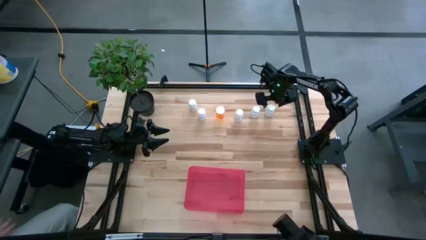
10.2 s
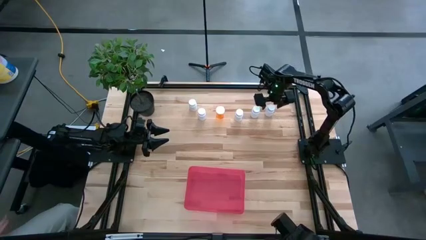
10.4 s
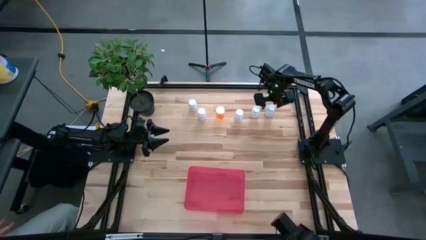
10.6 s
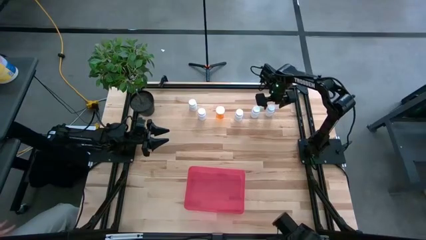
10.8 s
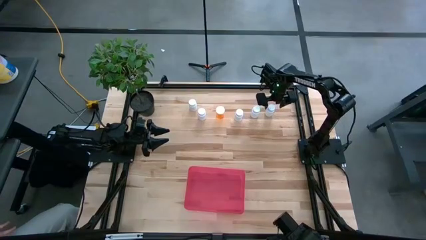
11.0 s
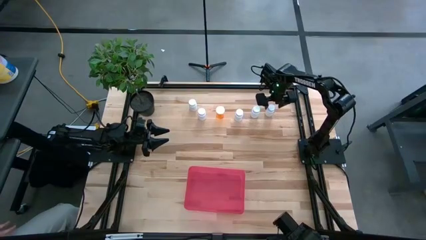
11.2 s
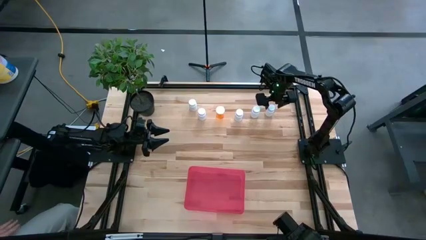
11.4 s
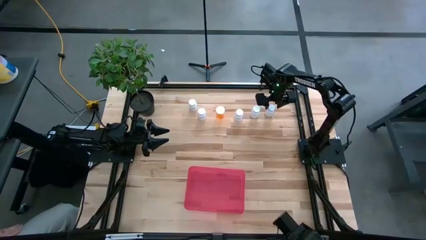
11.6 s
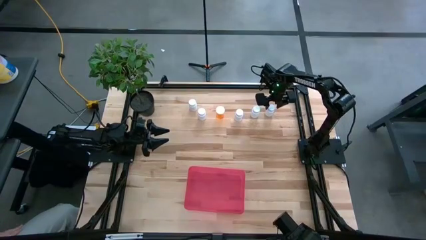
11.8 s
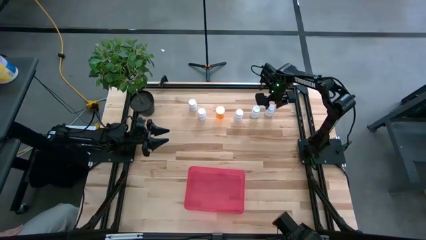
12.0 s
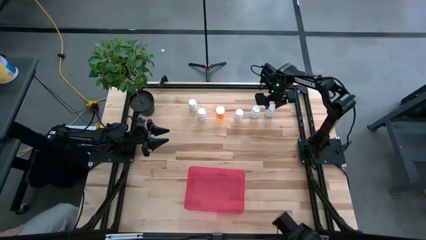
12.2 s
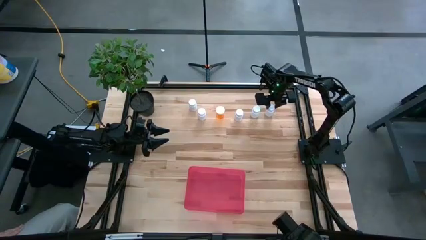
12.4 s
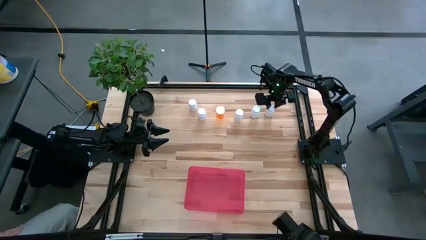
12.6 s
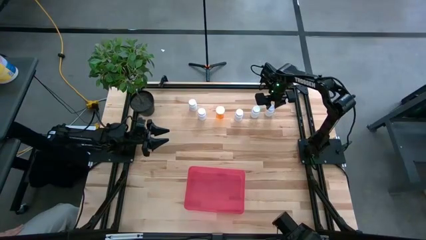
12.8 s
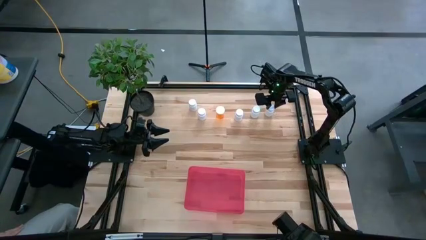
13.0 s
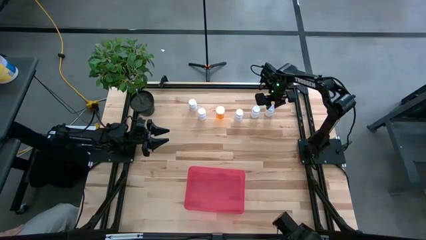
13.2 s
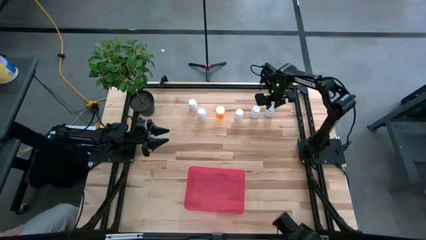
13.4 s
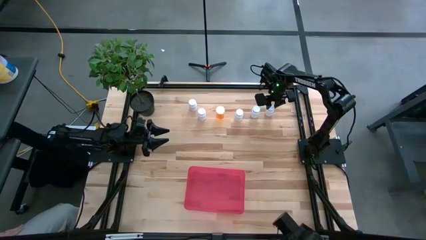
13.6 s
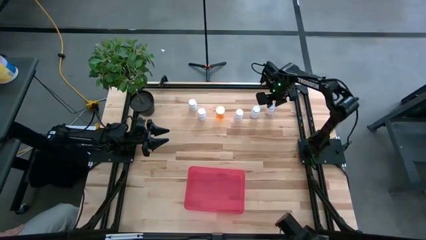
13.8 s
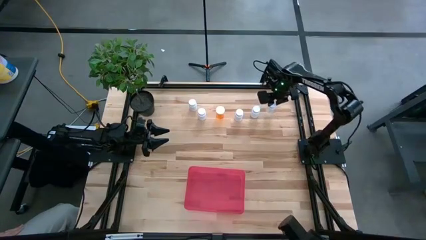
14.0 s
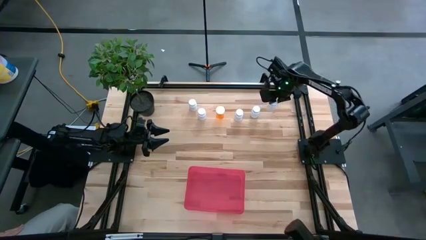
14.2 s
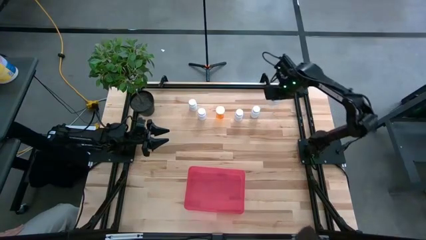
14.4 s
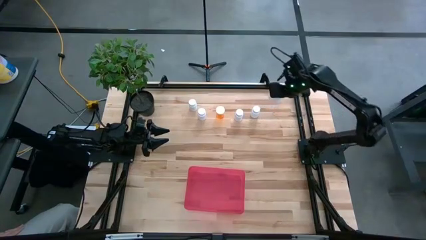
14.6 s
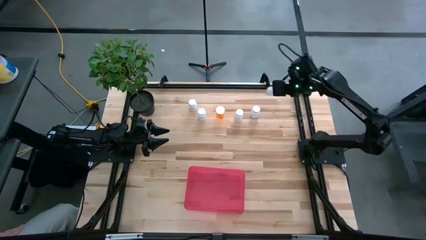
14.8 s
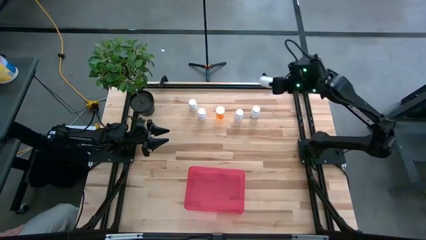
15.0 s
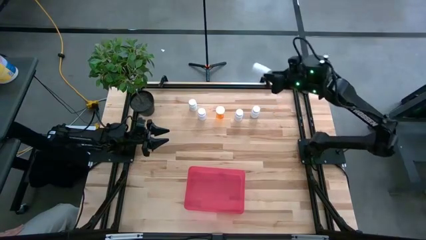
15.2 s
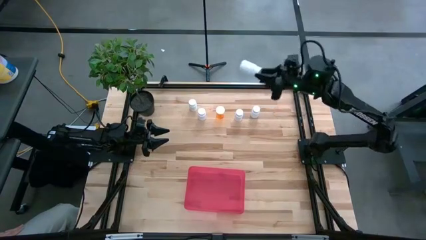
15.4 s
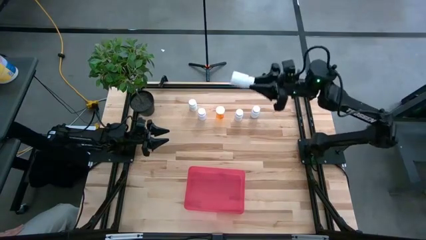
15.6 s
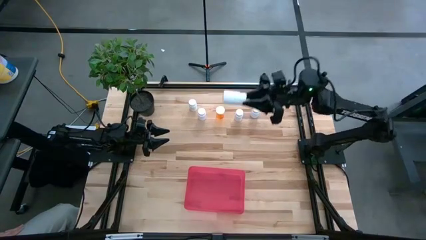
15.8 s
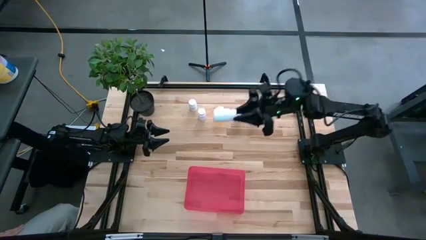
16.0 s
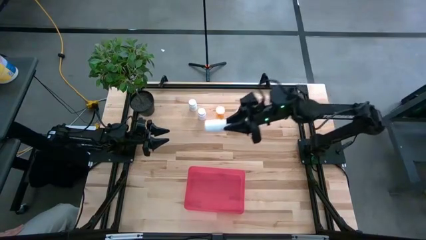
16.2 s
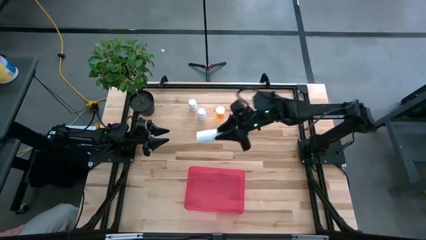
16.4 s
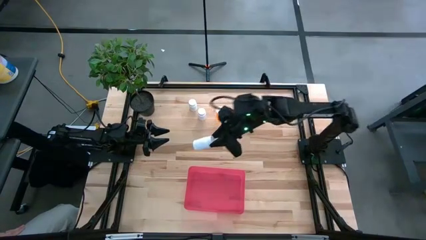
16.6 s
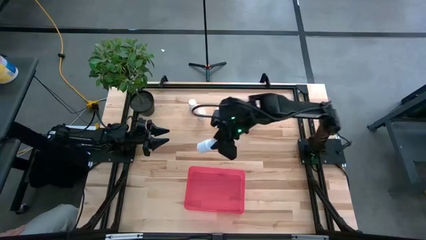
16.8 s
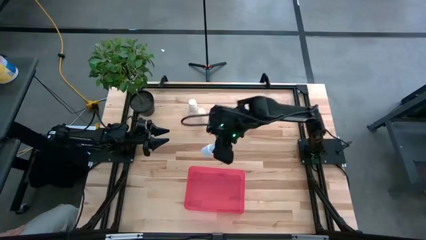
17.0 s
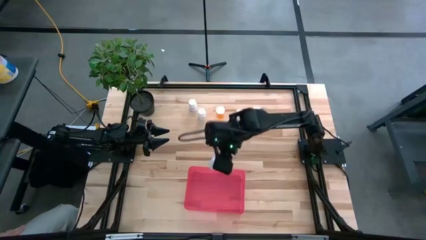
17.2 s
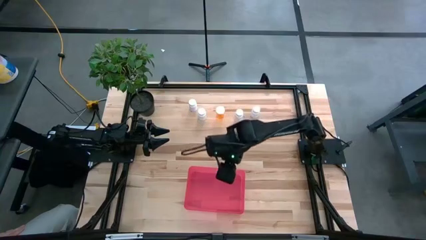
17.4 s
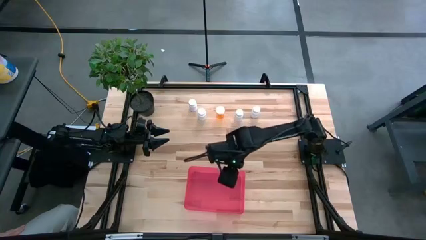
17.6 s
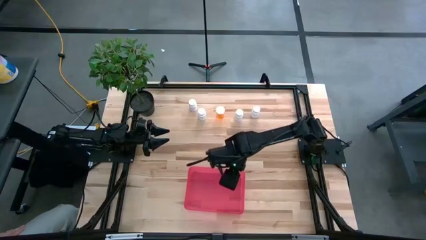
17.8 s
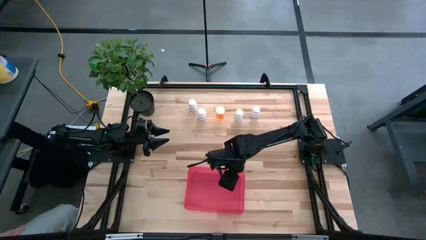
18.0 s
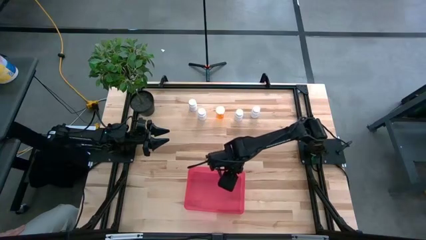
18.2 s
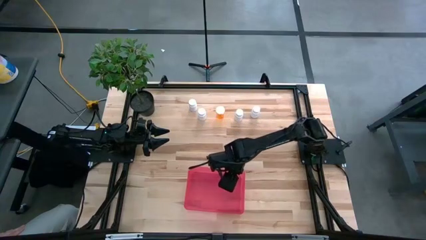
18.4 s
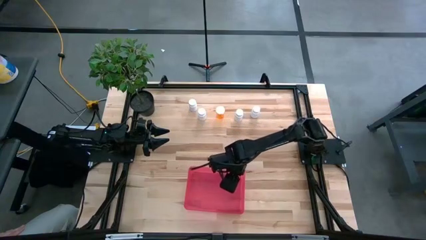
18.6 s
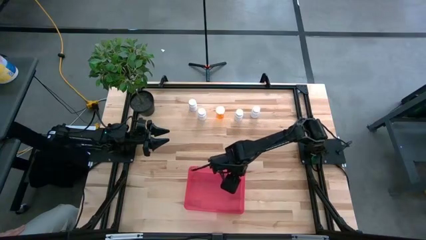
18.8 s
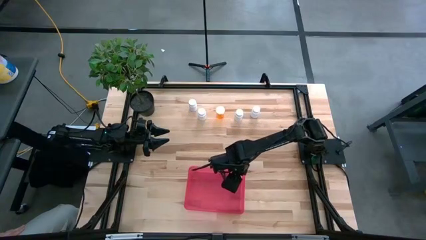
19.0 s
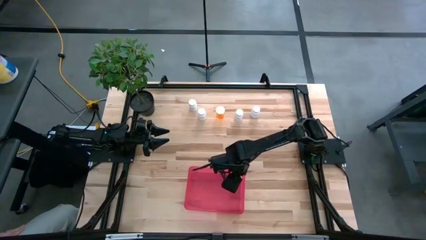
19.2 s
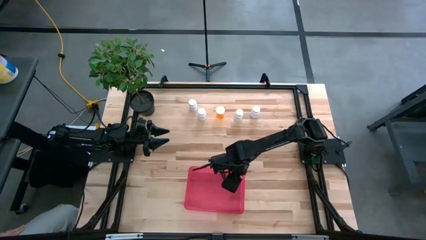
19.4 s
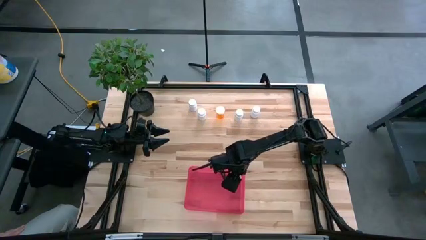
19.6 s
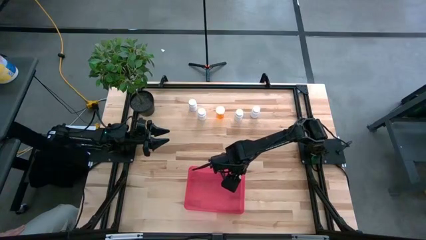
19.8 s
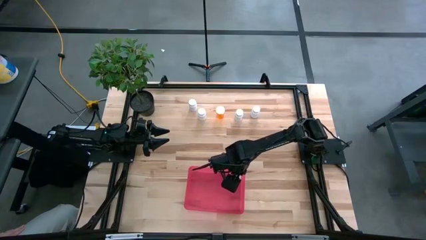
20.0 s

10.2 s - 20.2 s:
Task: Pick and place pill bottles into a basket
Put the white pill bottle into the red bin
